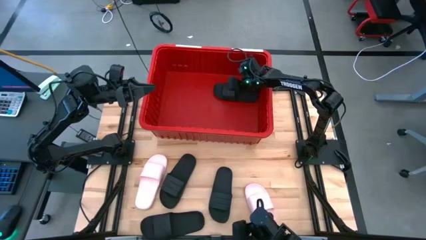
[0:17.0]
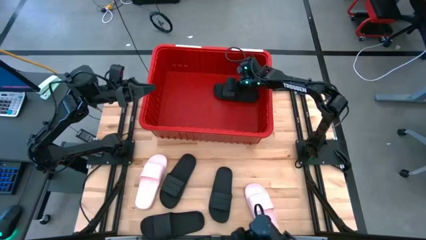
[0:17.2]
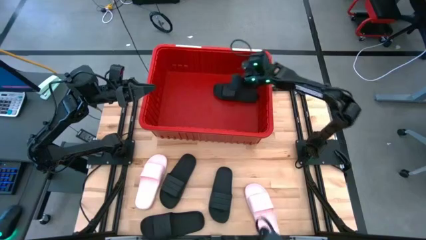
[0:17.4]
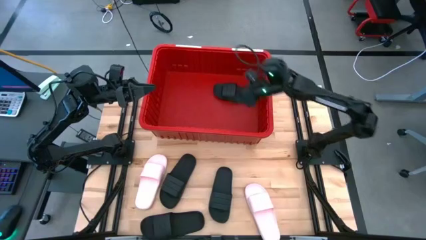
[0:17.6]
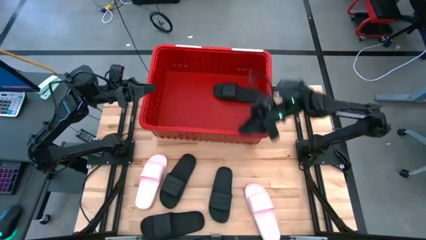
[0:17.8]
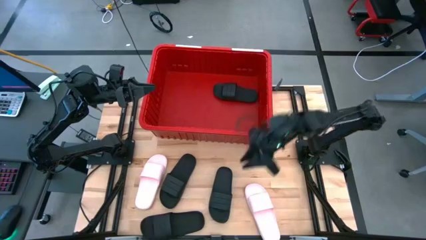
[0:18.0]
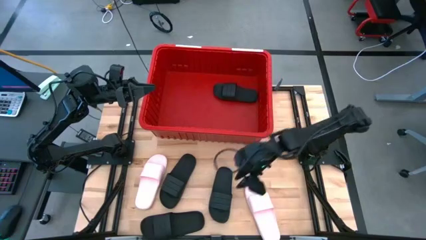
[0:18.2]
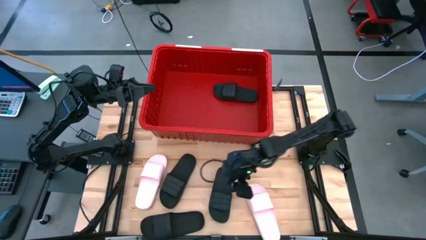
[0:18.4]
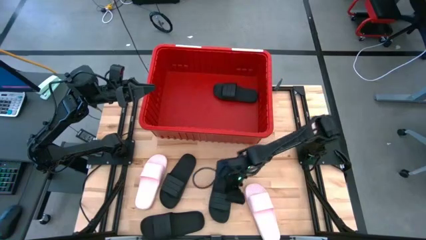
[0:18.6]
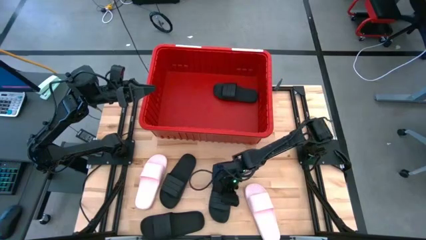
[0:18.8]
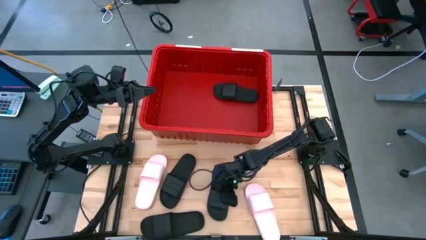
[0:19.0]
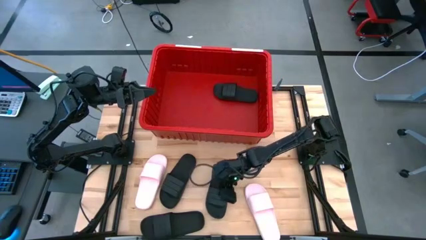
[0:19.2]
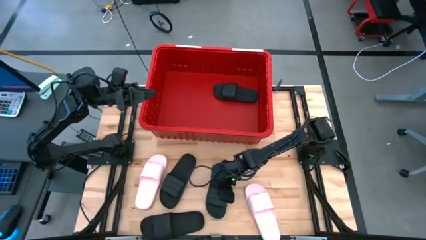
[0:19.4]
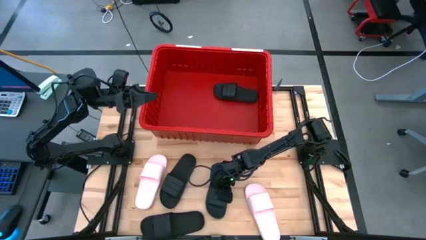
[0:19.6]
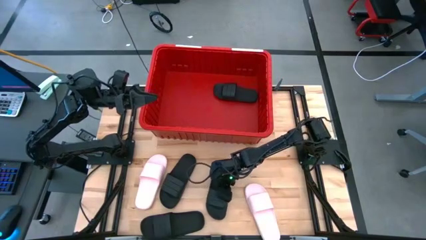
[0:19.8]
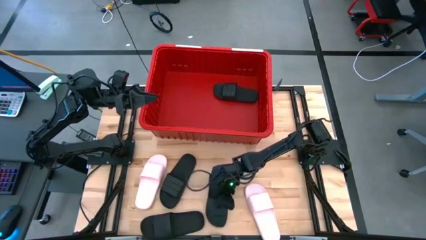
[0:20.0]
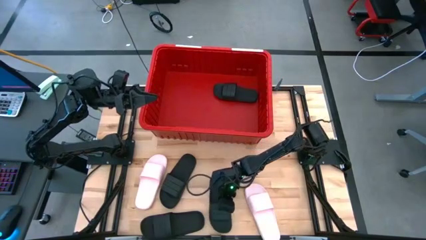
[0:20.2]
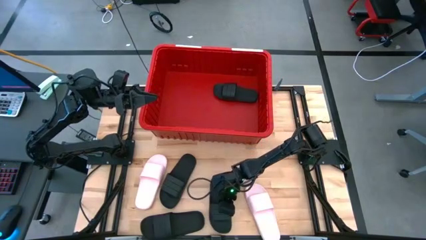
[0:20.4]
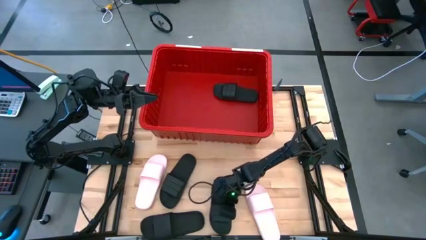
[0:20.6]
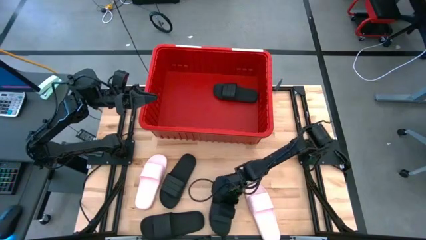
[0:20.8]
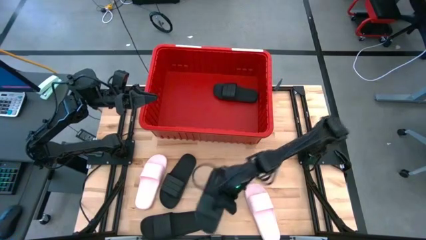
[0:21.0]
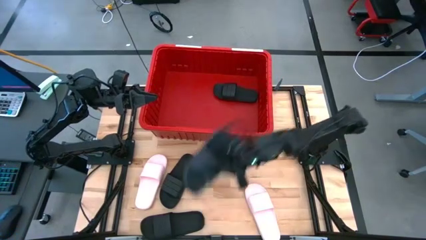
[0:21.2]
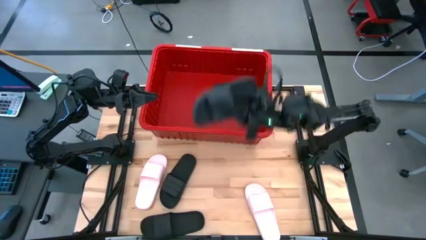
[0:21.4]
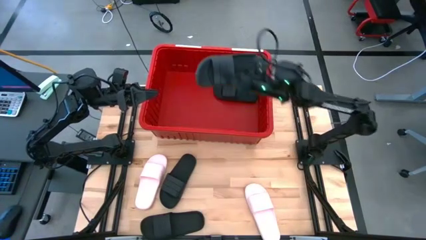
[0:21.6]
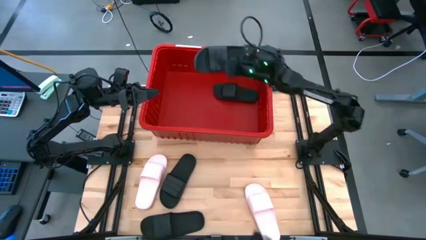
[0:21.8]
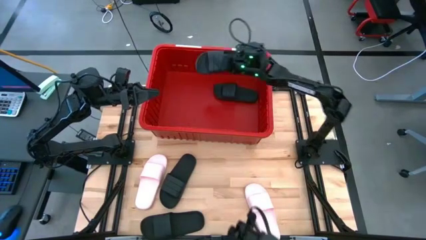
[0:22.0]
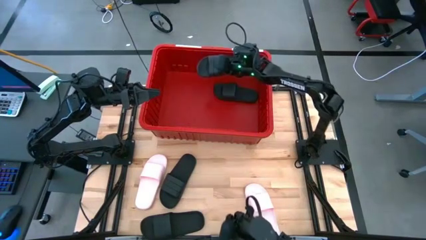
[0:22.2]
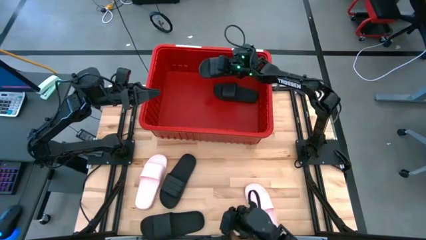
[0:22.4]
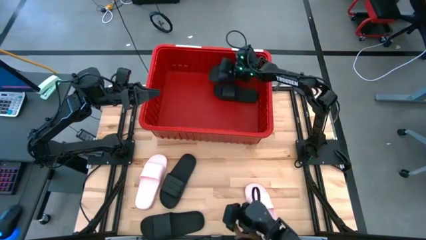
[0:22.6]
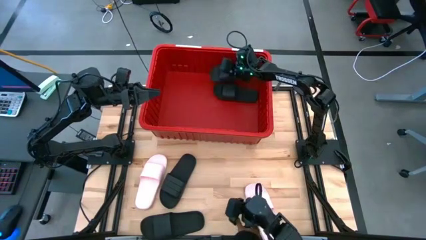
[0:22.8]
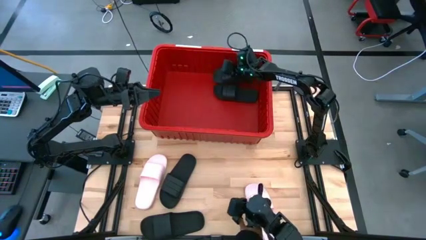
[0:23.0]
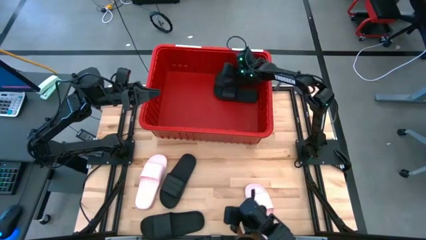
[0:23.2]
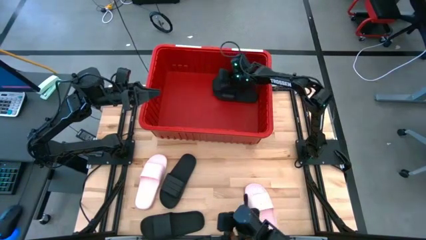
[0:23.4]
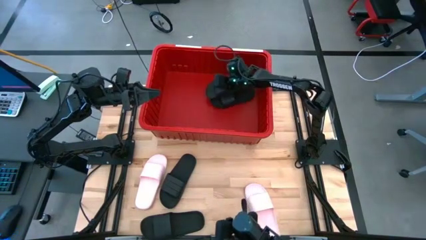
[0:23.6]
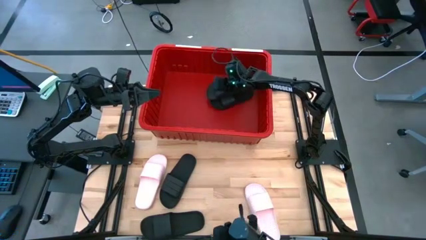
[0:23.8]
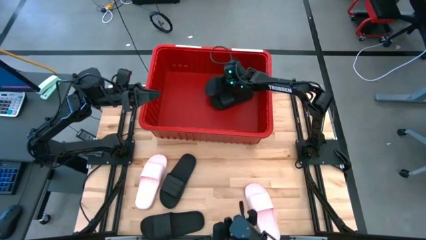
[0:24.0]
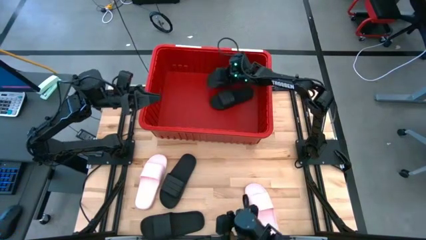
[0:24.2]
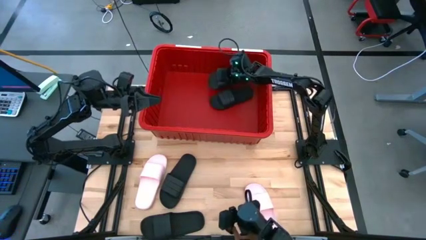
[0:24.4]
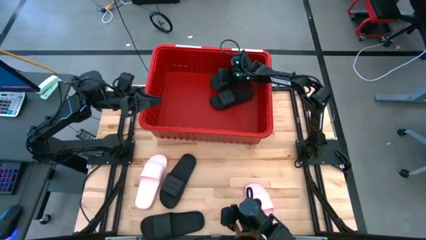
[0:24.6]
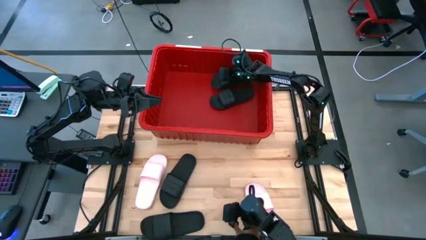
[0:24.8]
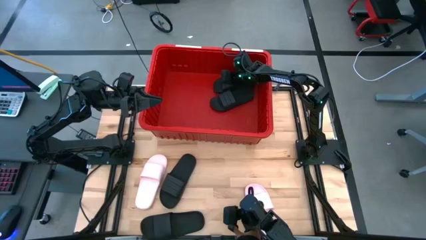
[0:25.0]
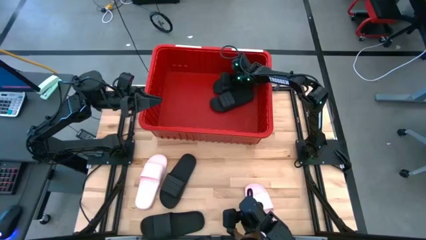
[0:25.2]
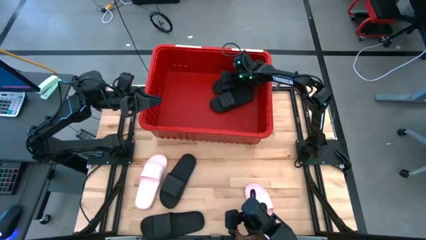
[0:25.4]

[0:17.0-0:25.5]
Task: Pick and place slides into bin
Put the black slide into the red bin

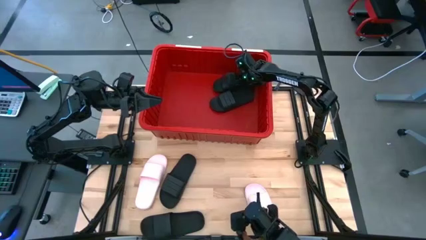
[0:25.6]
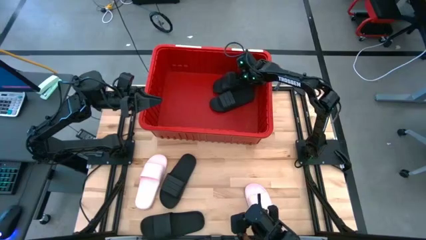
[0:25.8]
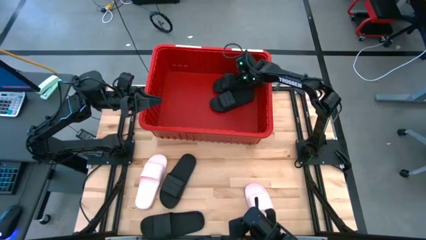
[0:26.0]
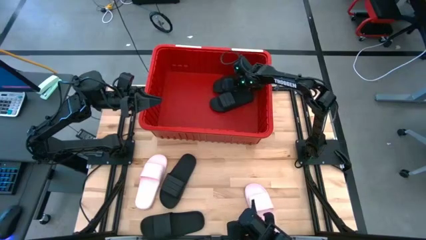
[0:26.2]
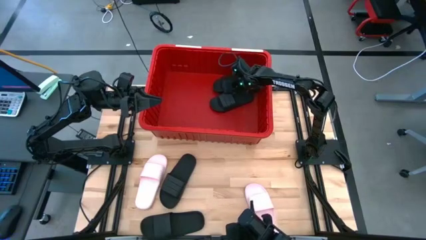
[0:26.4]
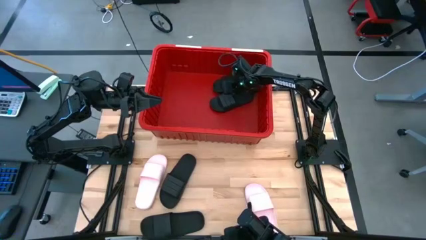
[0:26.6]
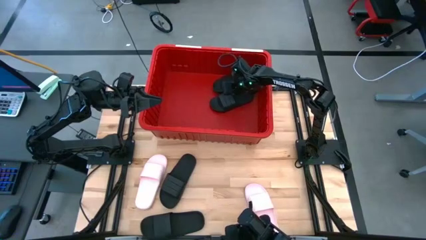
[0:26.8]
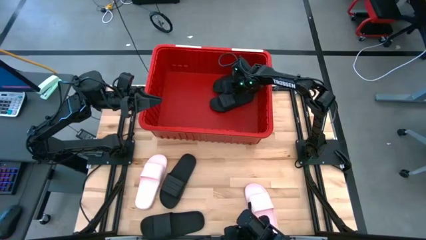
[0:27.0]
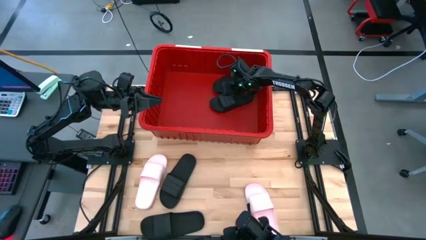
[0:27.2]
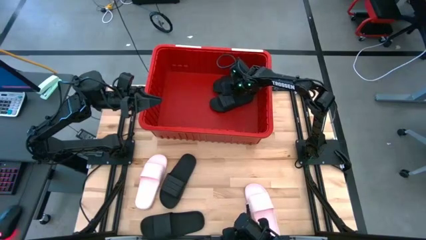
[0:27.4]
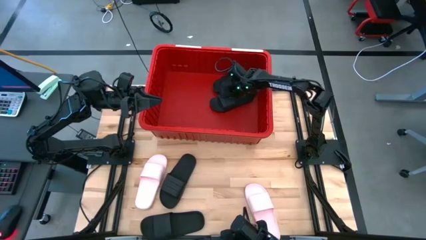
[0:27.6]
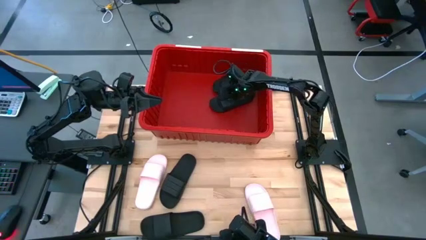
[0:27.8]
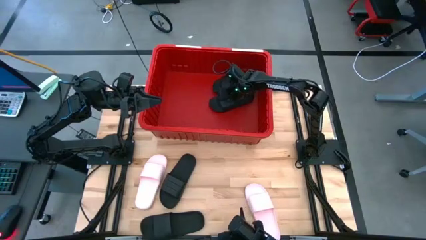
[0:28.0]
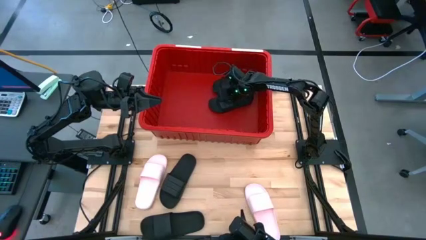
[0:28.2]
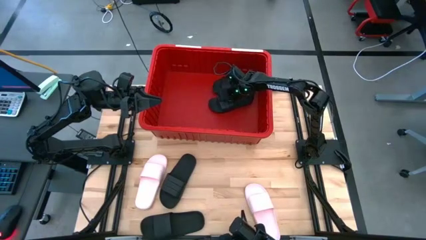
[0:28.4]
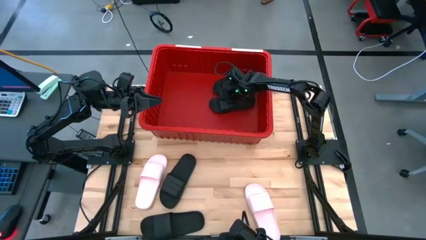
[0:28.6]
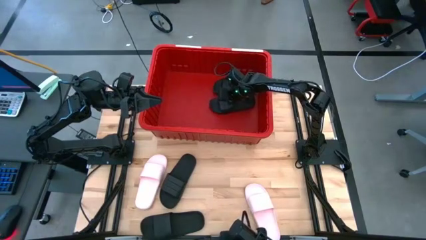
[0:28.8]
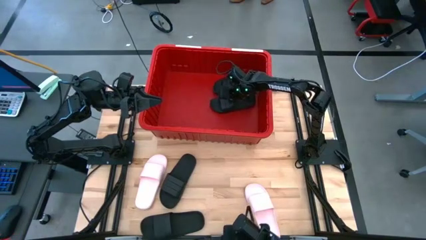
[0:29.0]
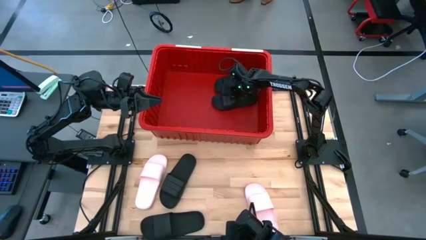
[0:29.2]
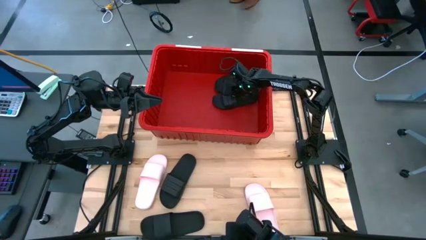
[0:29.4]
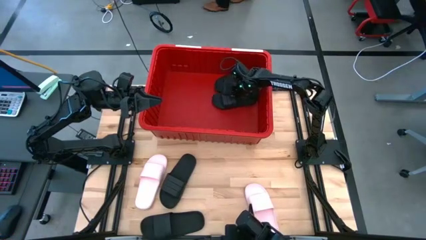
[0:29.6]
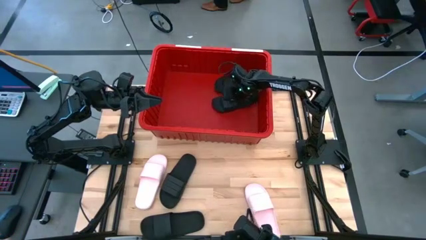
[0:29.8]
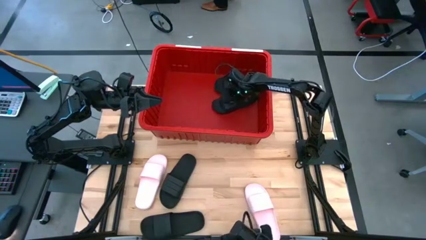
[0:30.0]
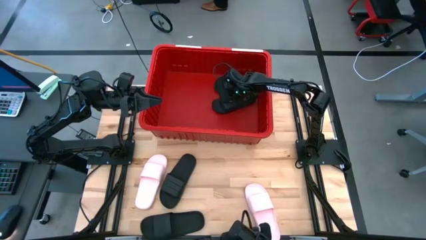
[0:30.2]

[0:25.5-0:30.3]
Adjust the black slides in the red bin
